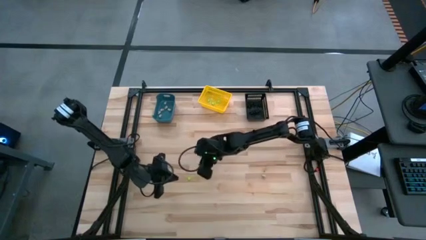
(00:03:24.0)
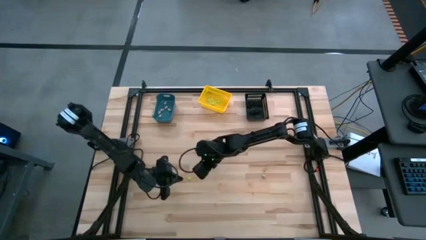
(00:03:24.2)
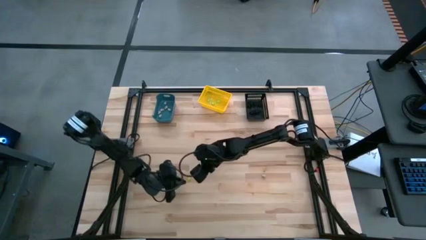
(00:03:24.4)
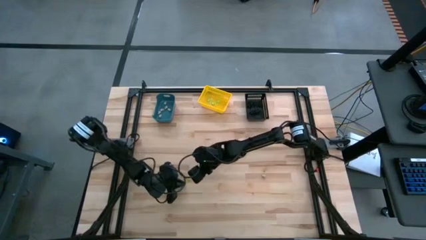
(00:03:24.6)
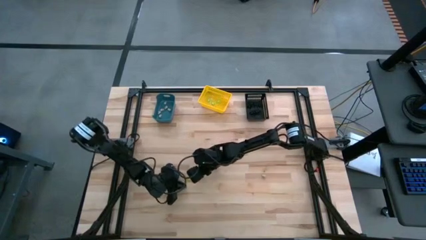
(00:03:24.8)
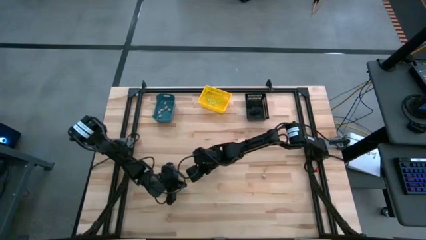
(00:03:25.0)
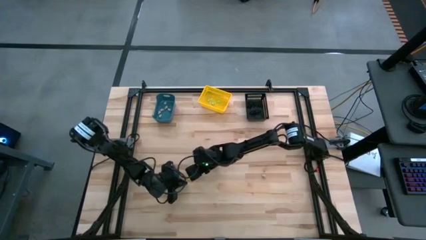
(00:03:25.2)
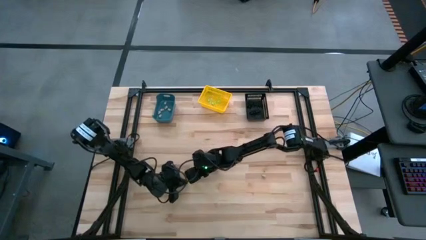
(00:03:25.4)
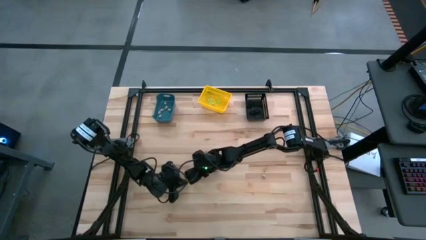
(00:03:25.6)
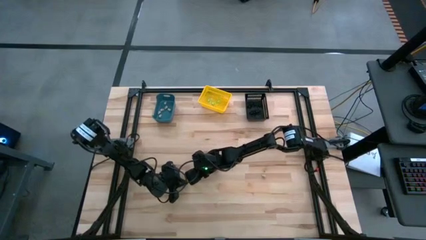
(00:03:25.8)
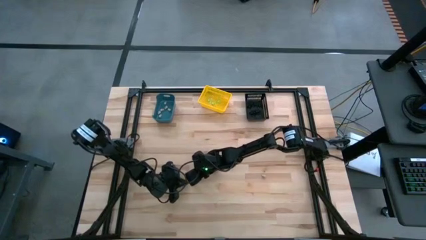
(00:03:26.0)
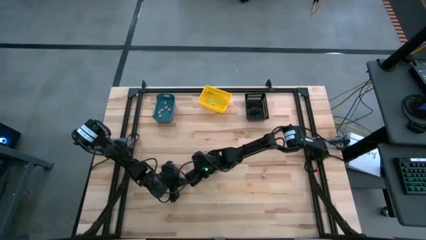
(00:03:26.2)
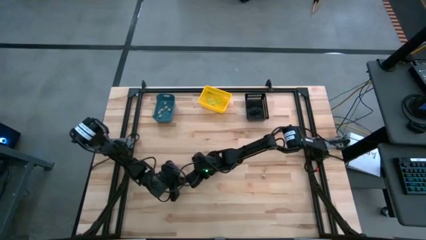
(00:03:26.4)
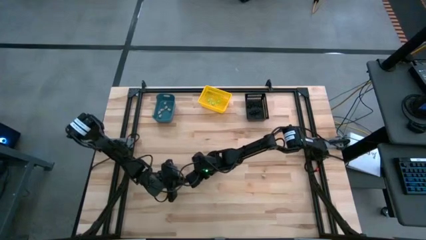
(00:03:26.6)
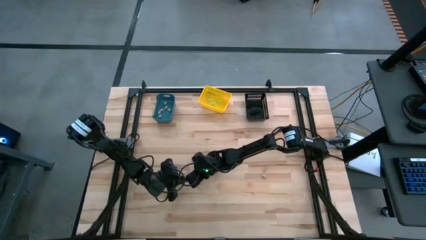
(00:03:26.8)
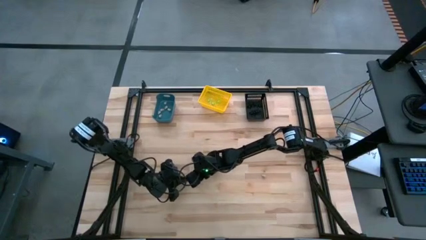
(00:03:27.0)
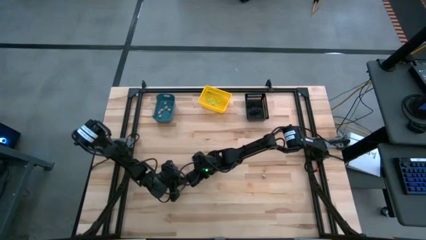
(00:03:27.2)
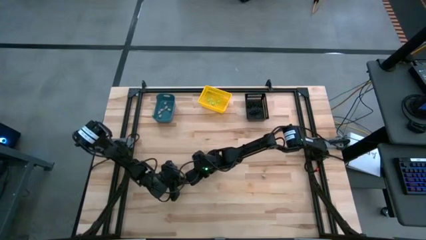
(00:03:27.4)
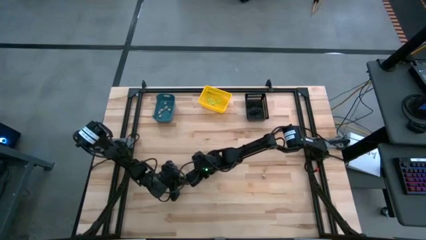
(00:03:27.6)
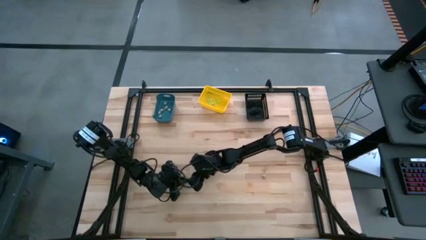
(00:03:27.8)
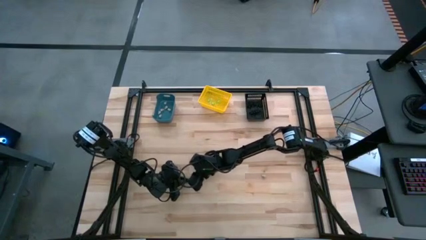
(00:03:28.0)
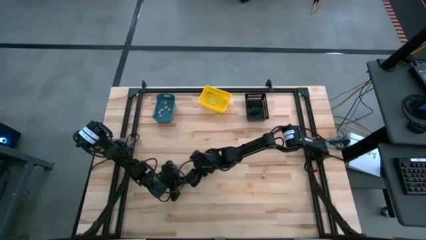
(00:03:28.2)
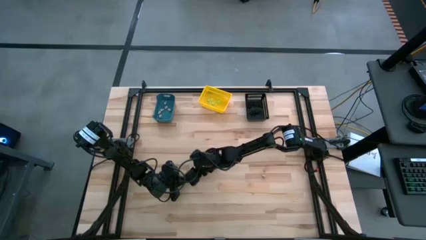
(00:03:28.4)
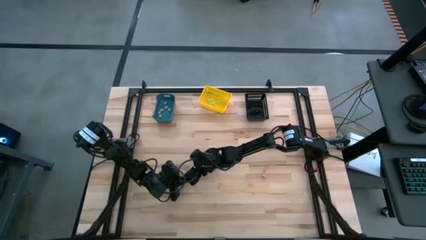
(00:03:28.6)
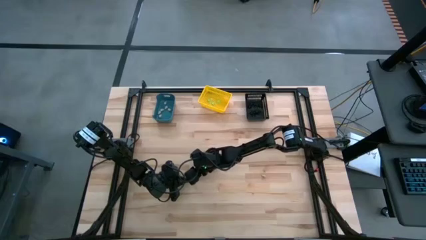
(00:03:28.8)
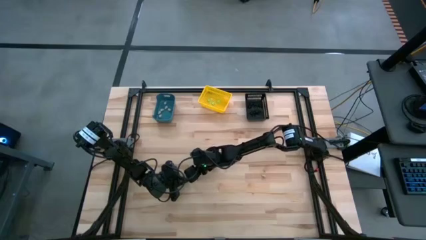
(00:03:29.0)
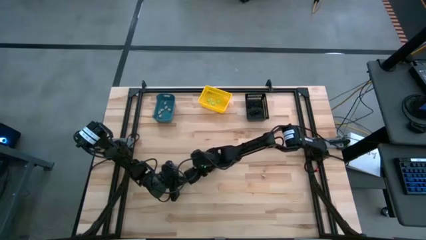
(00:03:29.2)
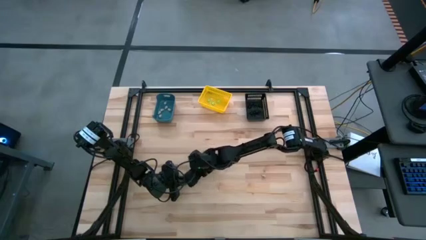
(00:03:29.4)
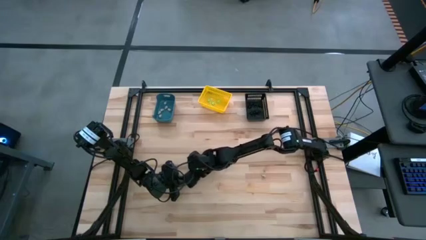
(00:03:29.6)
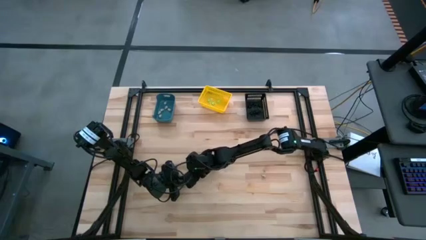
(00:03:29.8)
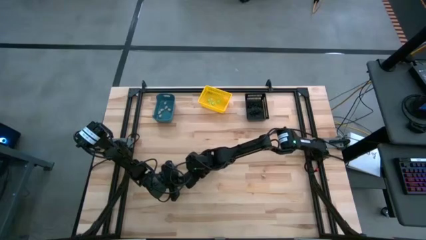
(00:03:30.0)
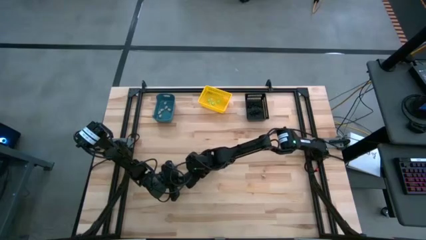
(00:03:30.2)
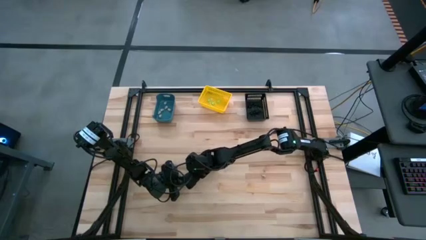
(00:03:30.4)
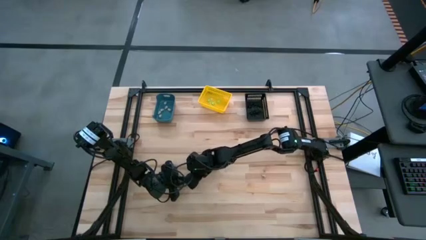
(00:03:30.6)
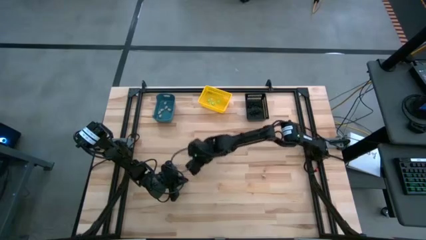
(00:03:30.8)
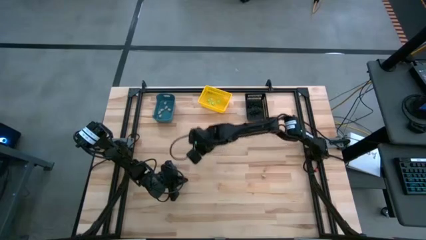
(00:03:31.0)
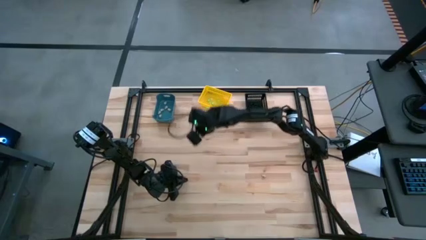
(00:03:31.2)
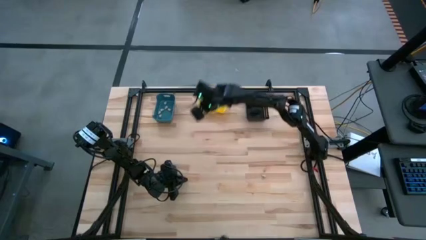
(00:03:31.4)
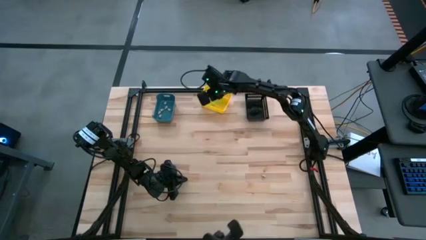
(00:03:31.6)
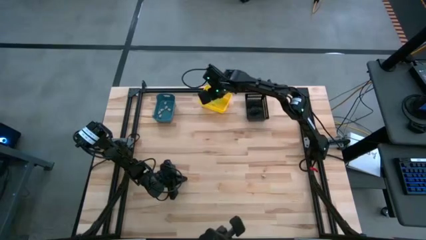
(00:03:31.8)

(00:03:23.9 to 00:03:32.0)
Task: Sort Halloween decoration
Put the green spider toy into the yellow bin

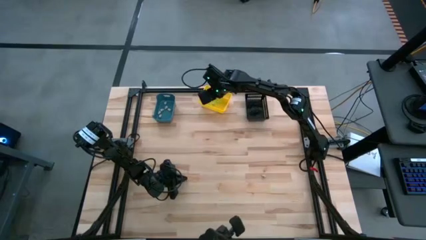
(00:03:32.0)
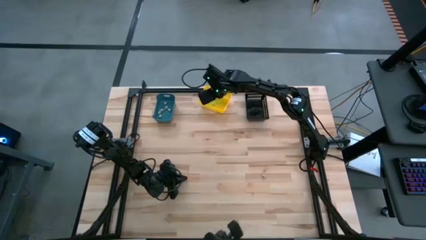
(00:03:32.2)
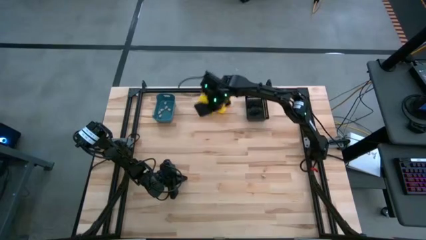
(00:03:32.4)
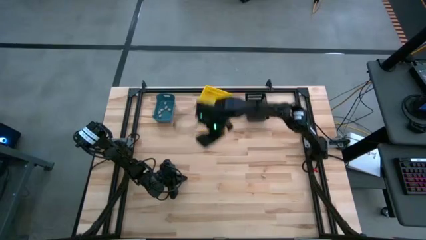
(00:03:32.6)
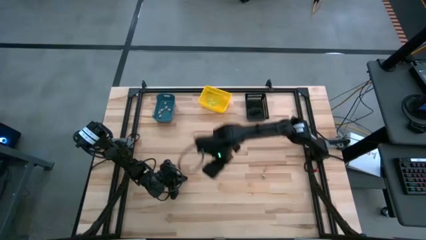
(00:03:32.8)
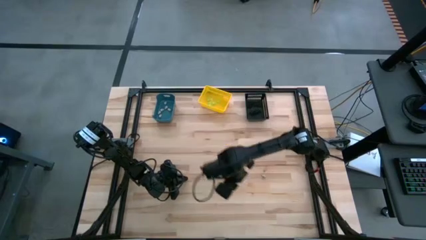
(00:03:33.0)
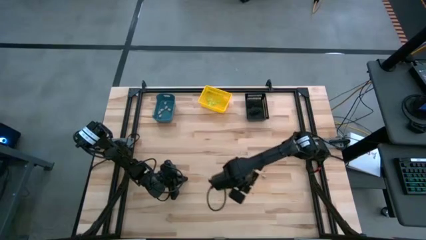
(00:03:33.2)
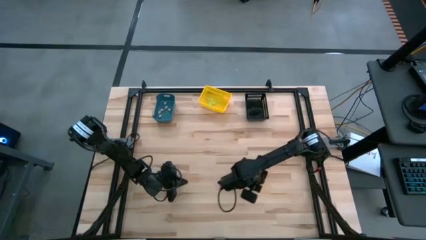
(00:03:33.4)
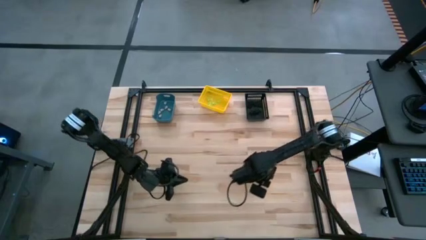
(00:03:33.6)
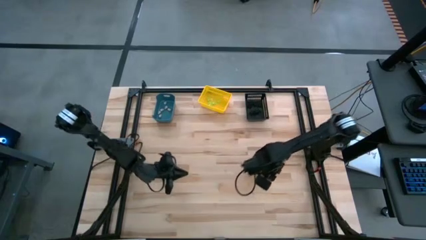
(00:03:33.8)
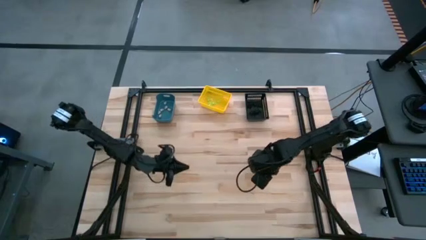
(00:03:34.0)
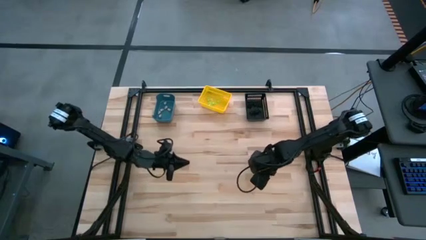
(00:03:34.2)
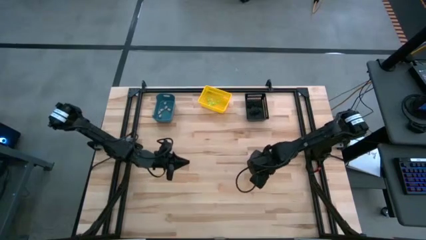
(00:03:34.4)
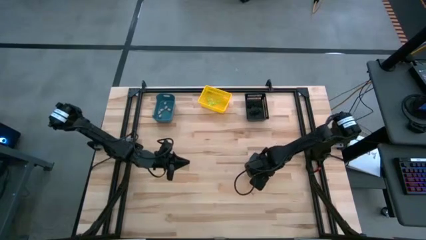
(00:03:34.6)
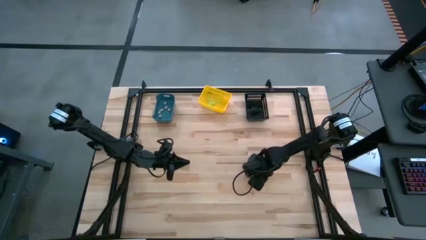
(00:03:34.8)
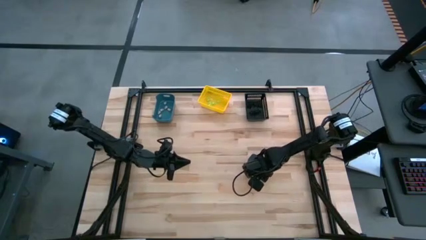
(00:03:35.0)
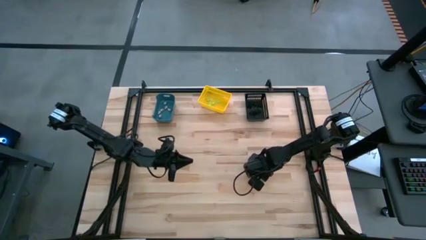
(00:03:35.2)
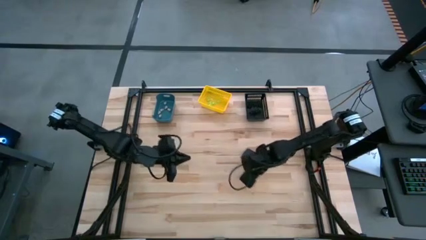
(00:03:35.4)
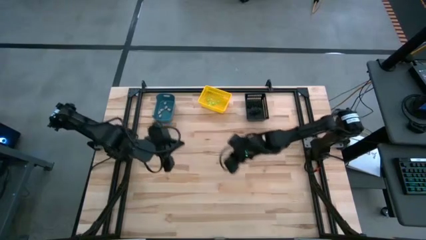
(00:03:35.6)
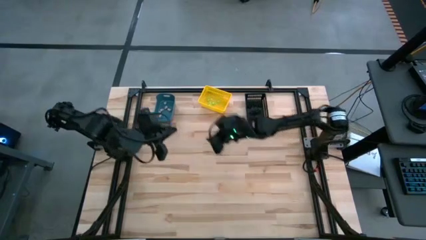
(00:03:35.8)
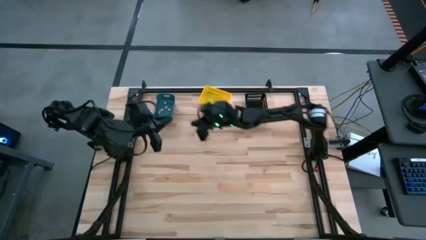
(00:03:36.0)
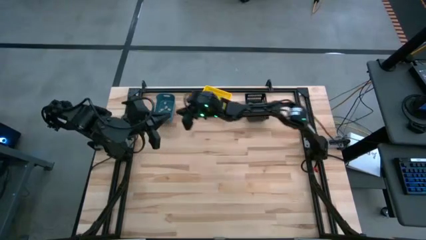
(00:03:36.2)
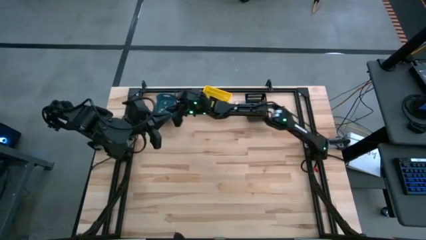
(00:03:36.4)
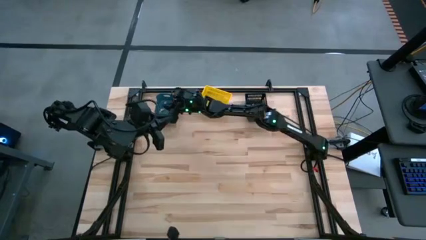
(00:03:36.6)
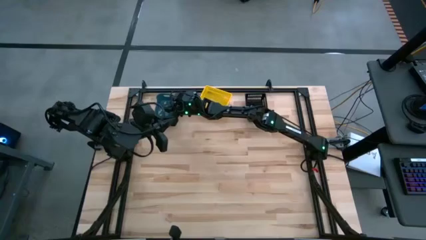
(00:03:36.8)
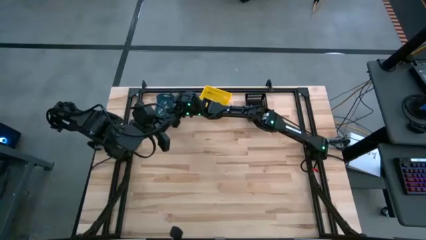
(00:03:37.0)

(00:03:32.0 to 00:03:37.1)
Put the gray skull toy into the blue bin

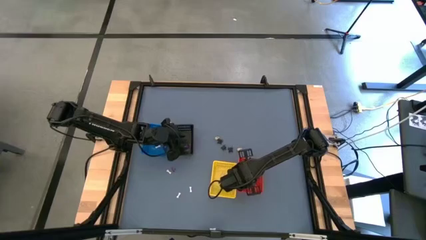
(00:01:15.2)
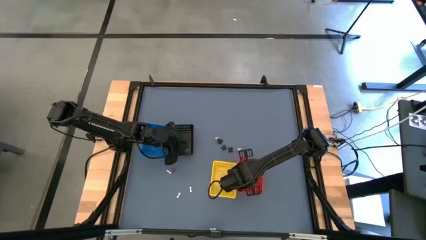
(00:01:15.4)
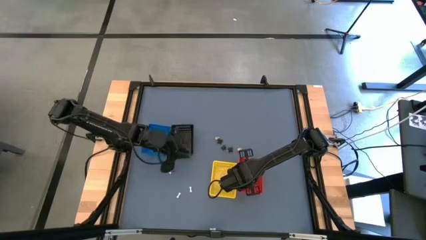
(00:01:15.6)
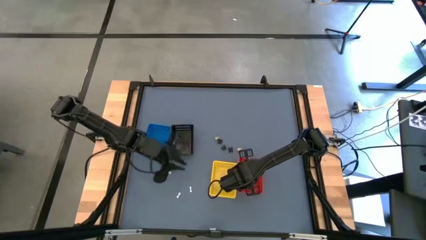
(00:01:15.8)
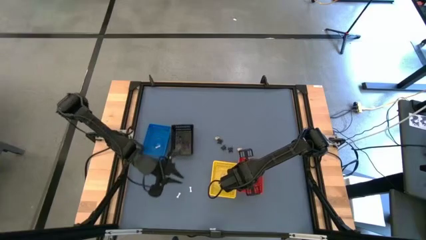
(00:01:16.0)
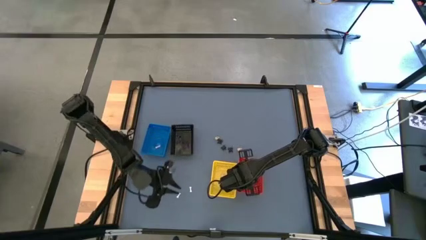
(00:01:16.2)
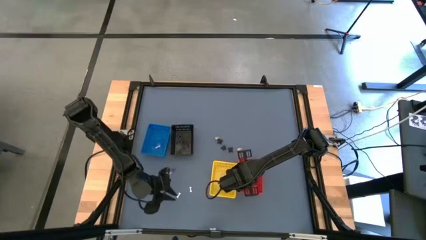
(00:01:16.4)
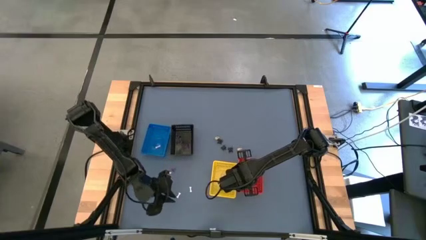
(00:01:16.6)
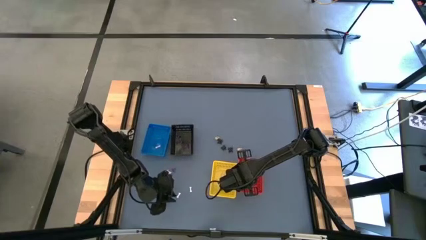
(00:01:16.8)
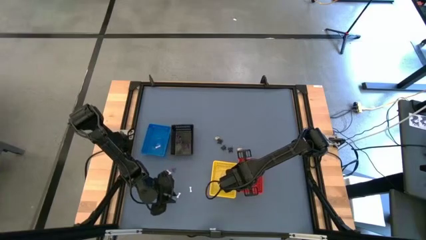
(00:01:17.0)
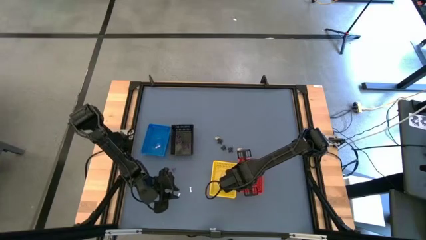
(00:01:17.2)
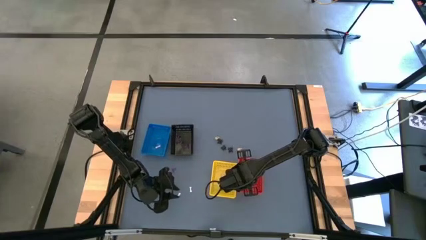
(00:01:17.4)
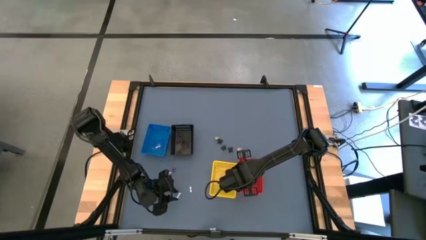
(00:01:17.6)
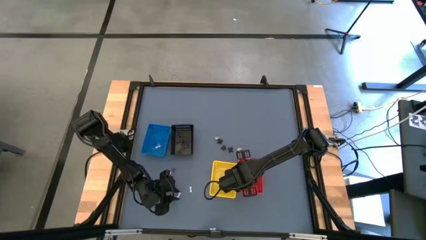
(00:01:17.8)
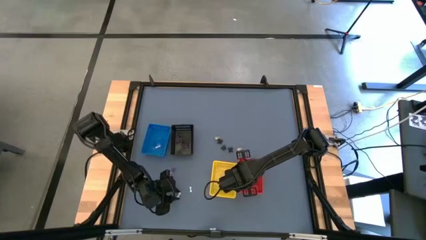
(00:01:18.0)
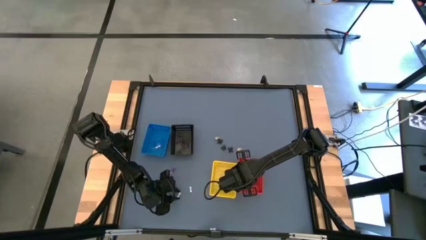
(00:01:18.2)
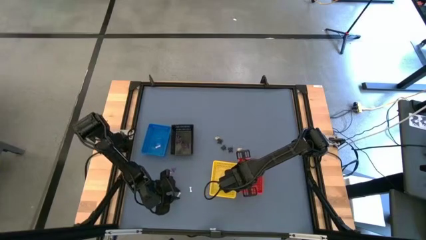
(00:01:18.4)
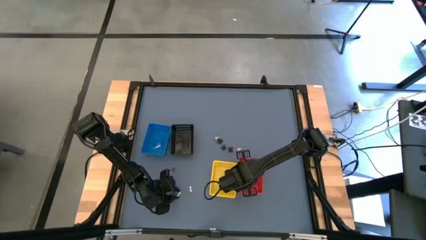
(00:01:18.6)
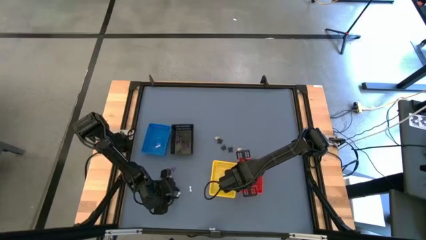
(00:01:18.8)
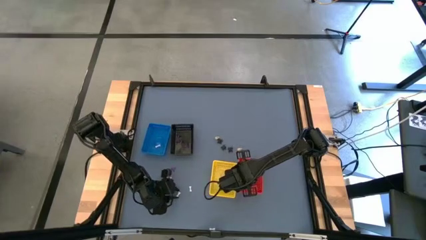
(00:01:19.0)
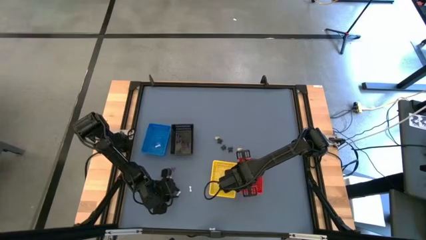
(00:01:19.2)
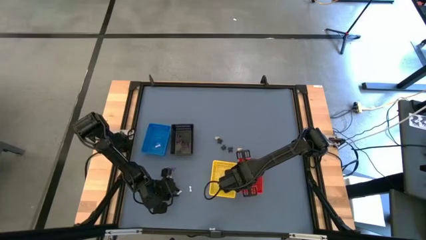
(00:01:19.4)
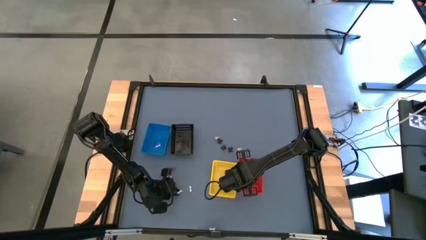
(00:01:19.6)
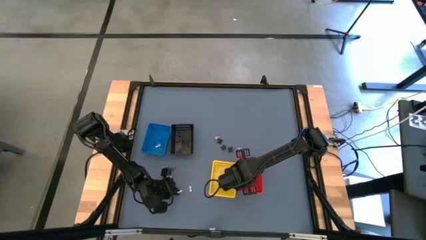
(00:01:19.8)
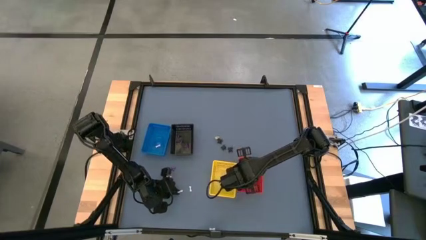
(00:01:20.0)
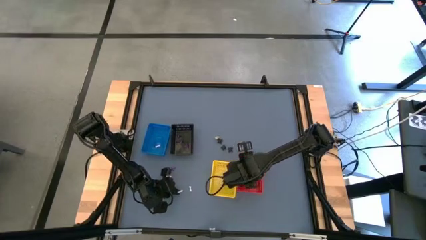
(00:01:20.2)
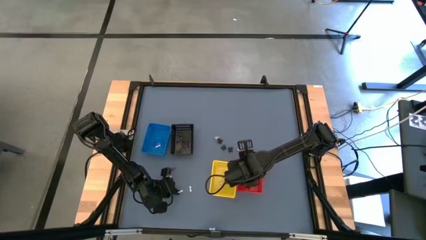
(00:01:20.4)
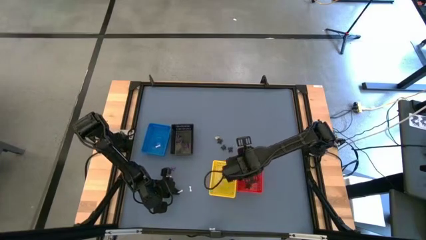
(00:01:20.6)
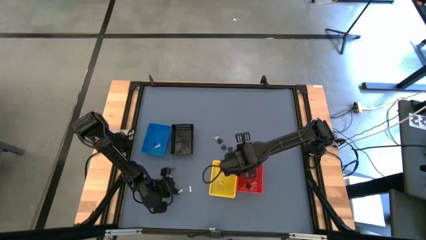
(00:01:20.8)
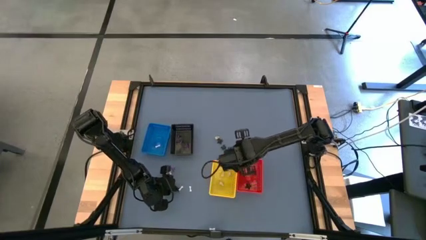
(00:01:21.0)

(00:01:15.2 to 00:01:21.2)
Task: Sort Halloween decoration
Put the spider toy into the red bin
